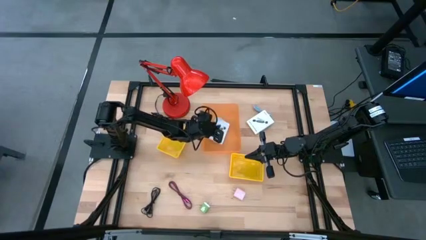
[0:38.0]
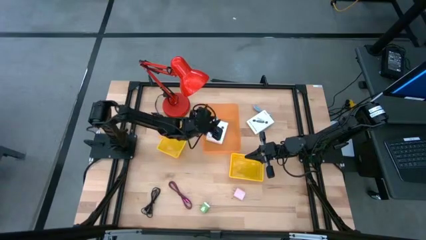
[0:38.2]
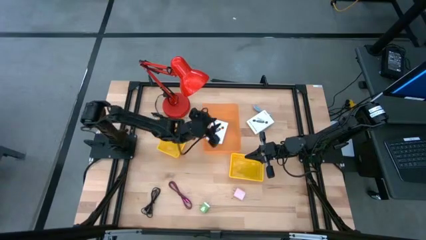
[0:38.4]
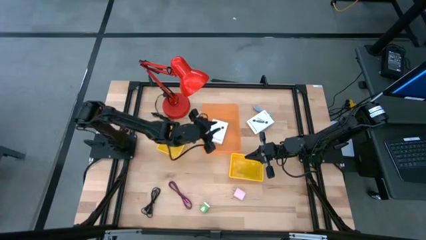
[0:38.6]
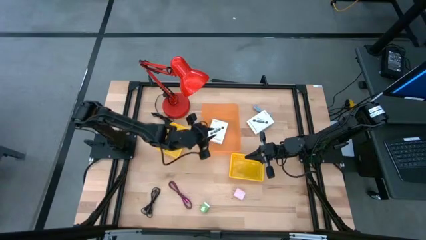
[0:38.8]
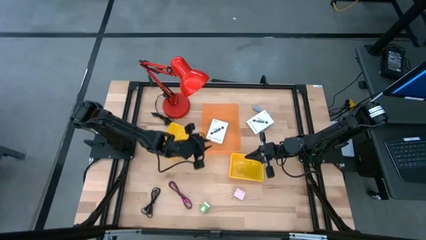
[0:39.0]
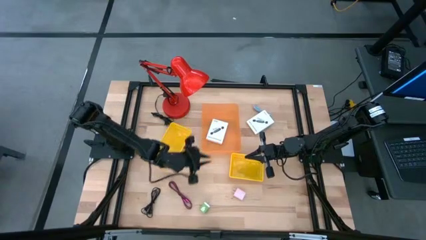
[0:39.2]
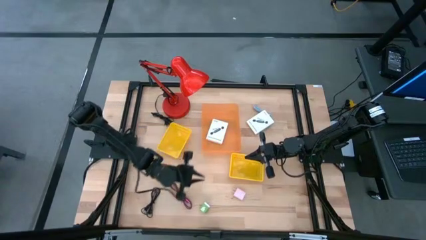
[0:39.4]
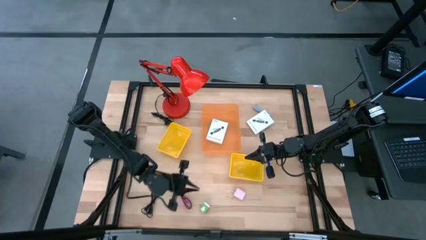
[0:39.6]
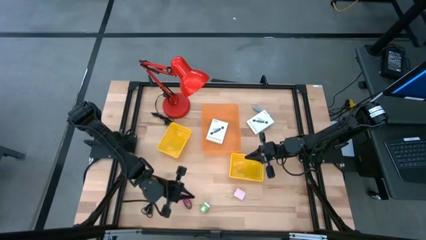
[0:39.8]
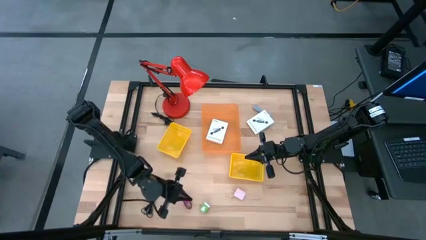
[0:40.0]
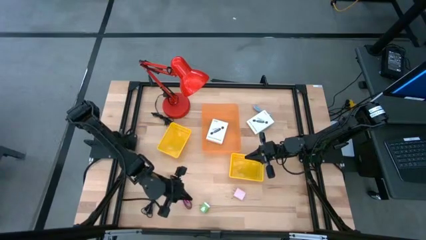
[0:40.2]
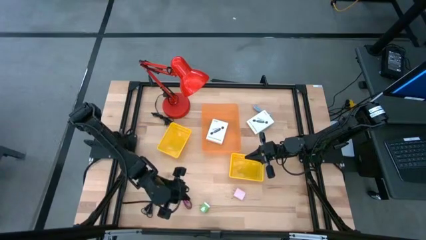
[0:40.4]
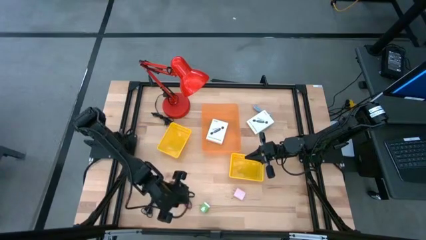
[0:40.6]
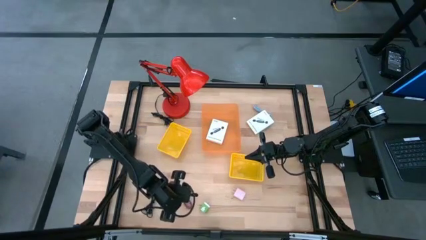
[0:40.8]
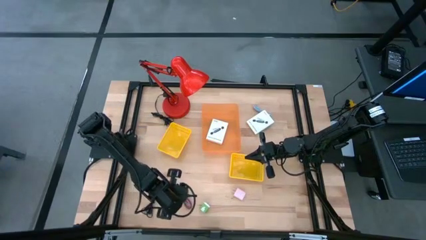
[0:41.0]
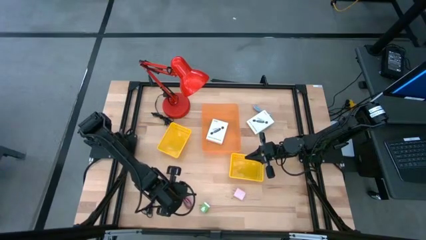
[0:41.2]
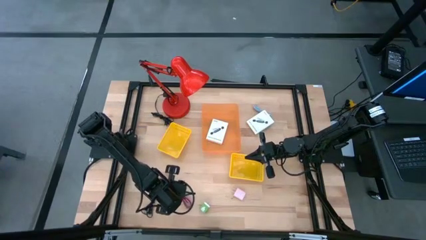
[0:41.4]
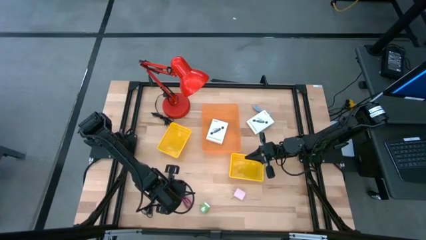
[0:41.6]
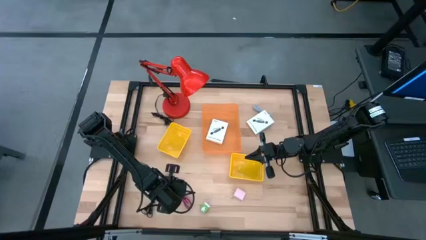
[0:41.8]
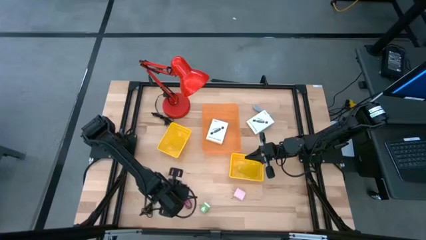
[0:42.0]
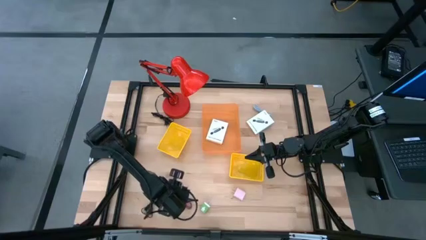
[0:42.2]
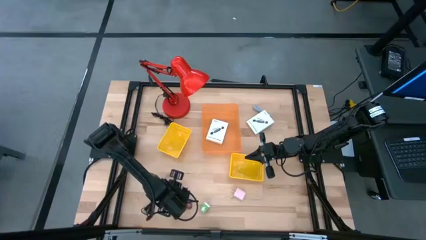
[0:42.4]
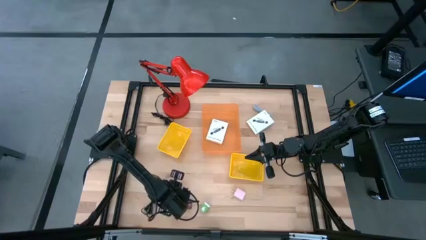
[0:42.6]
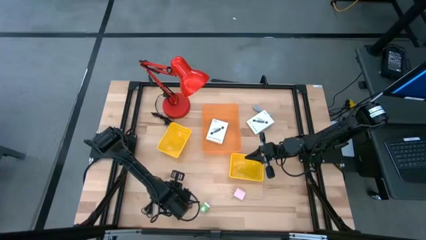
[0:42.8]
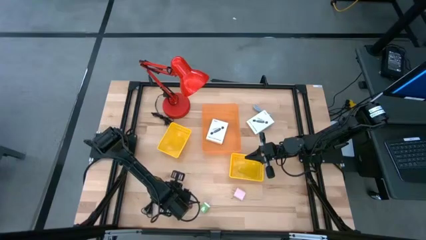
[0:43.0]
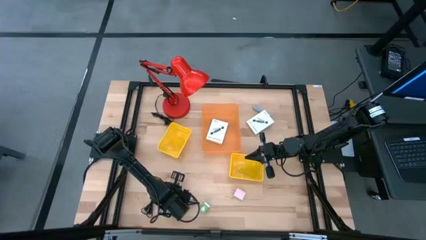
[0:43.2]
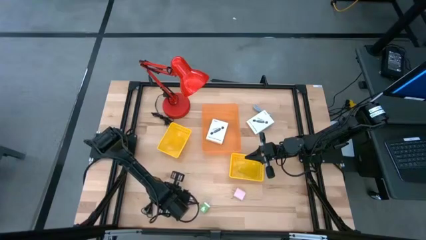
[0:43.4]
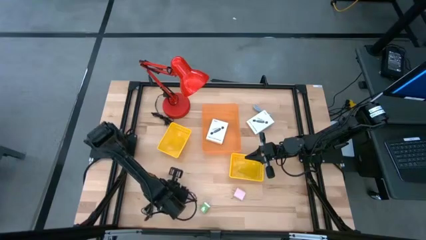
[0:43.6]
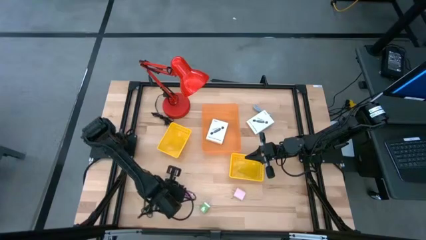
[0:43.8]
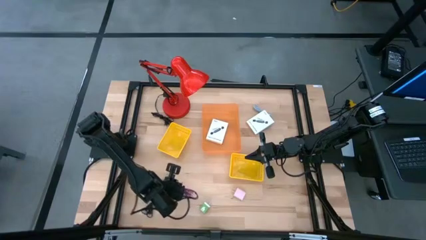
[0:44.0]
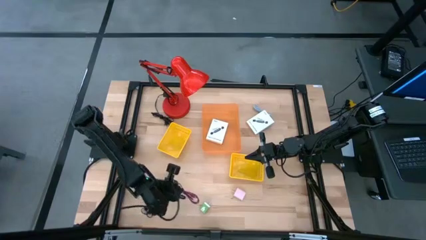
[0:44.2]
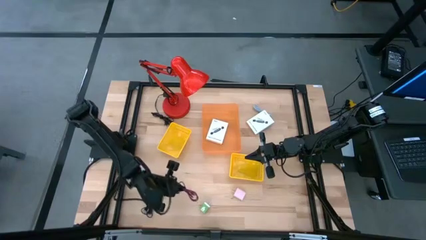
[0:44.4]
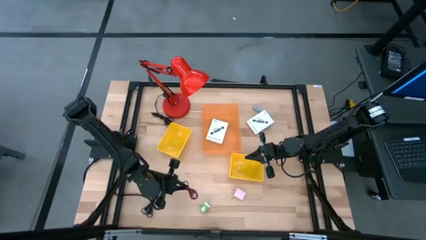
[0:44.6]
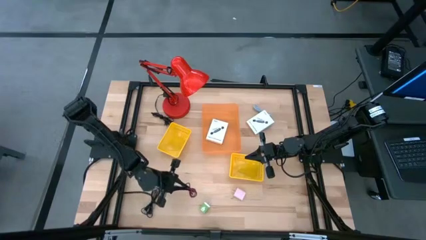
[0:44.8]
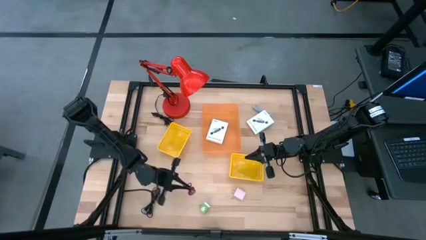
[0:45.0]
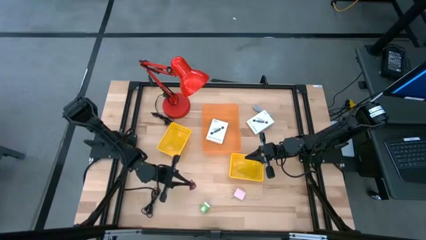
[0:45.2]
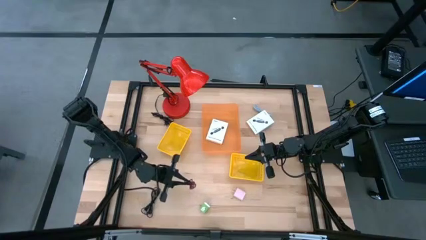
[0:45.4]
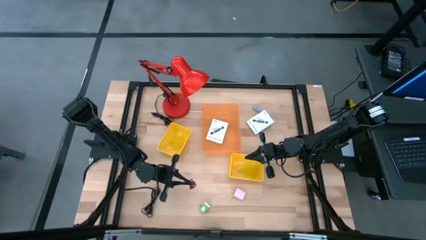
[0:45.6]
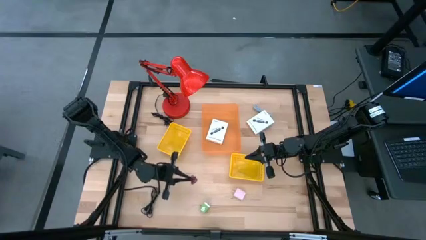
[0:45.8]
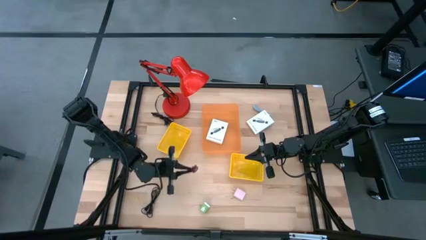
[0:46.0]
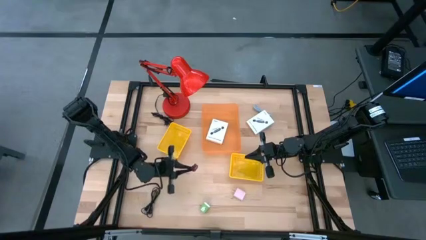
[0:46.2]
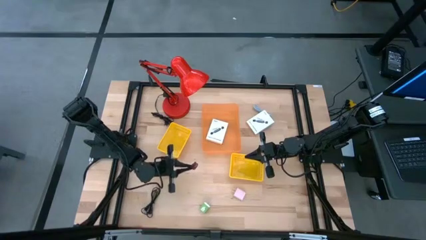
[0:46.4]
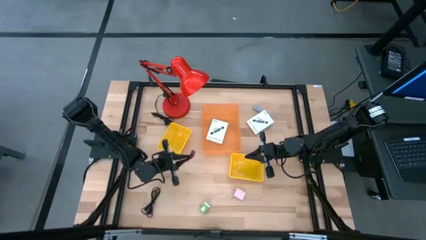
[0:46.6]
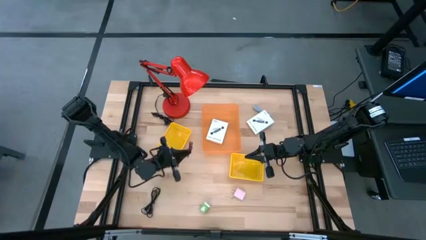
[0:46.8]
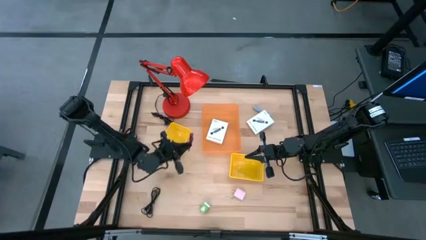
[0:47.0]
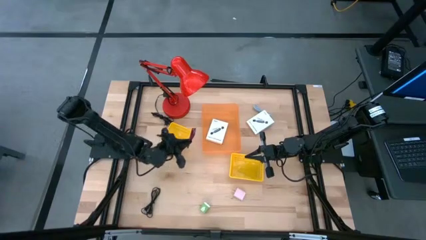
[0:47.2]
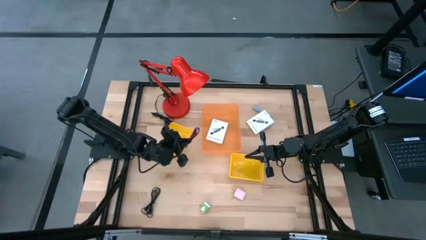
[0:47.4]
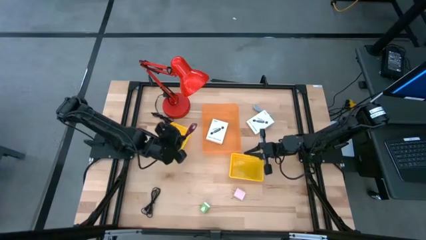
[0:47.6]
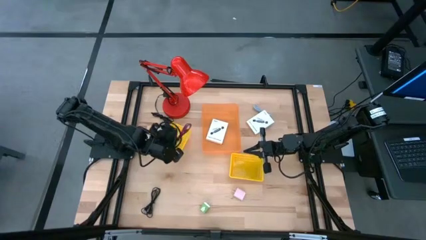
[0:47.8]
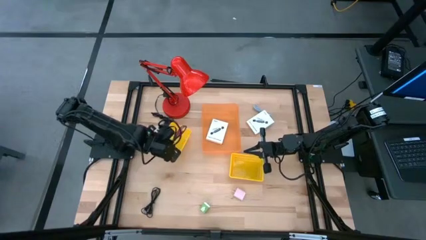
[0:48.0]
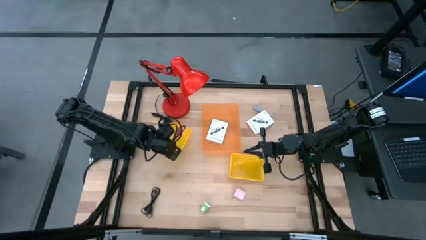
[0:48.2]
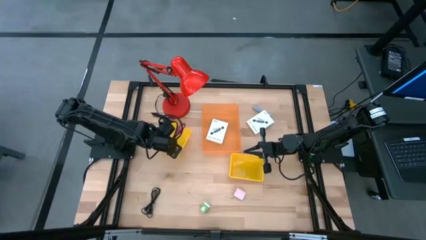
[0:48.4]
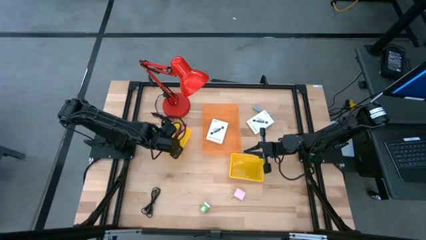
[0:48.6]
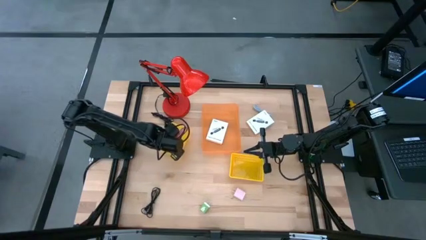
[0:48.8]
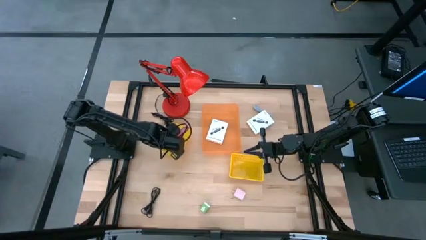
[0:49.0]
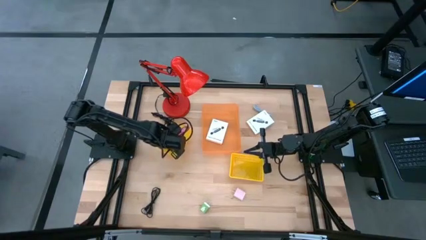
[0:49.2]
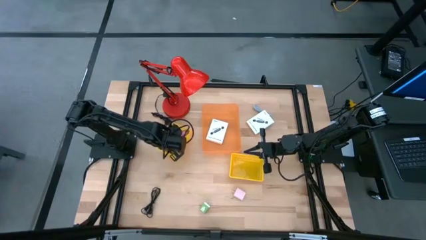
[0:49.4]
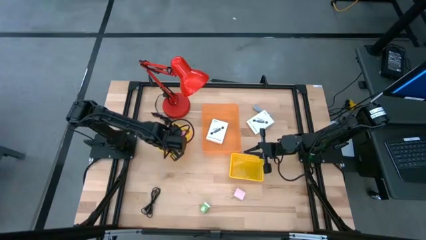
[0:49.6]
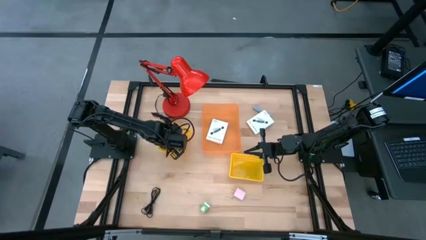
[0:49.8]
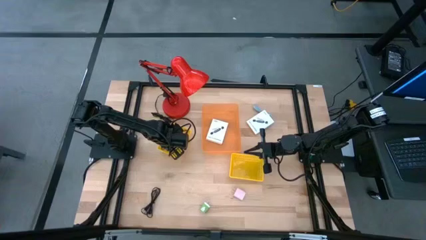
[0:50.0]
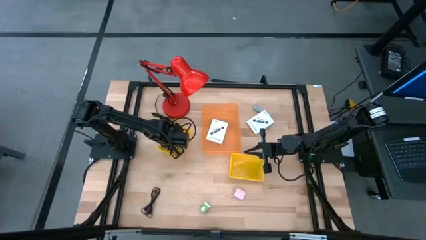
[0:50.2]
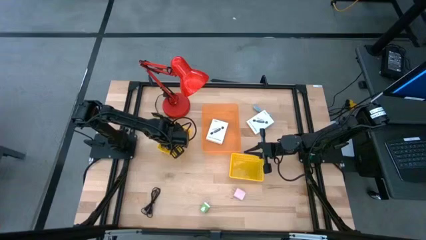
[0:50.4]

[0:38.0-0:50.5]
Task: Pick and place items into bin
Put the pink charger cable into the left yellow bin
